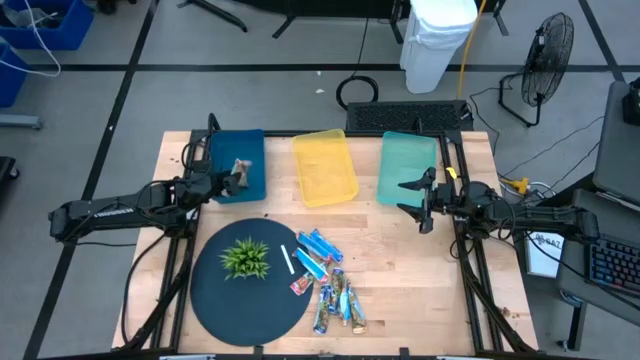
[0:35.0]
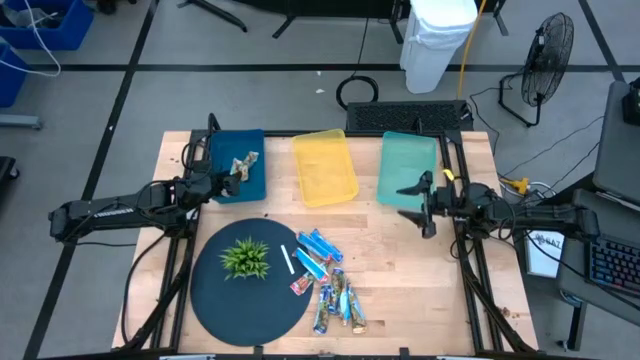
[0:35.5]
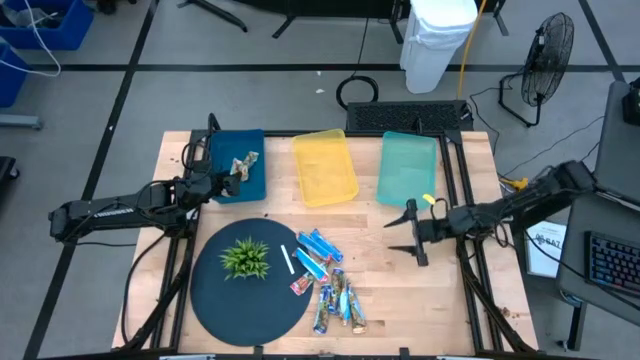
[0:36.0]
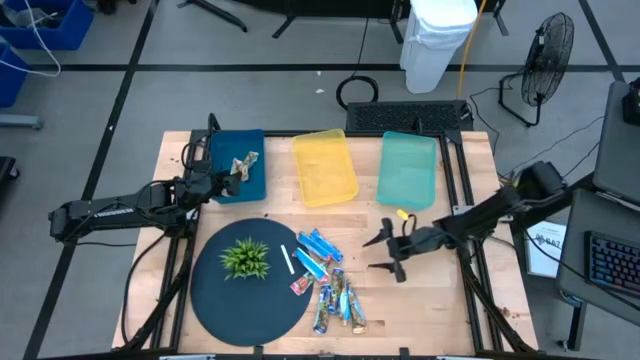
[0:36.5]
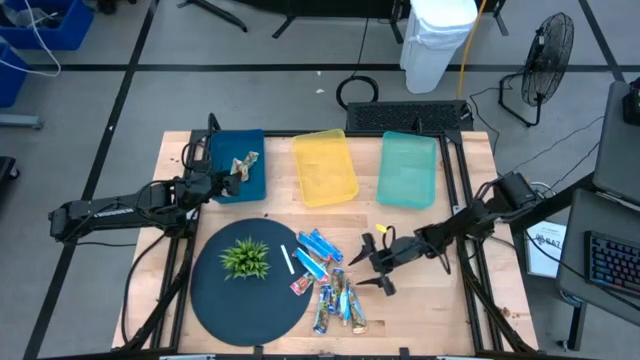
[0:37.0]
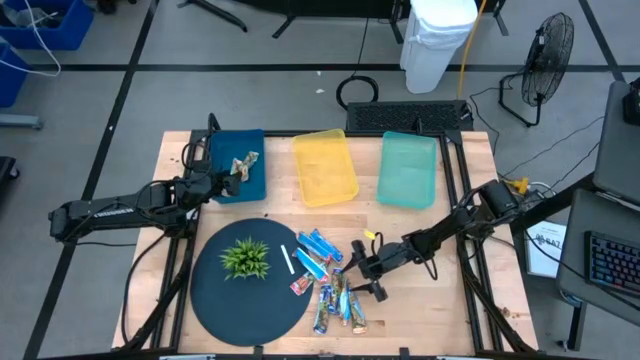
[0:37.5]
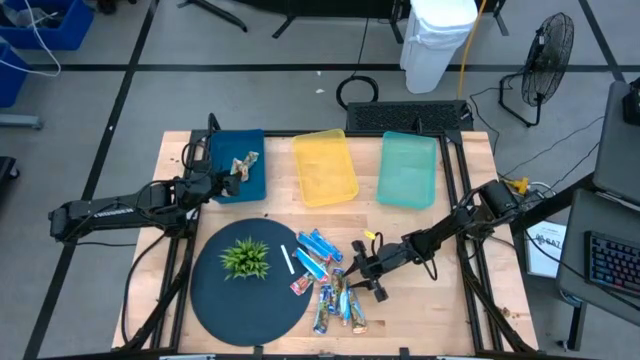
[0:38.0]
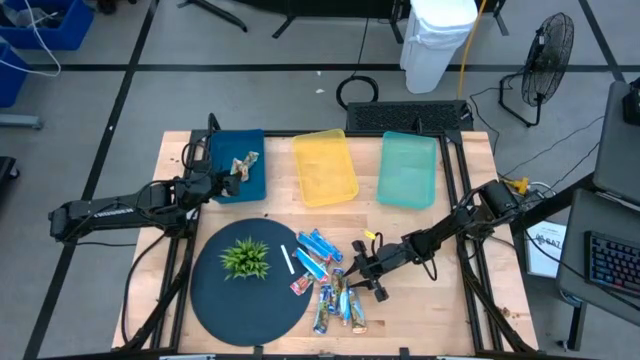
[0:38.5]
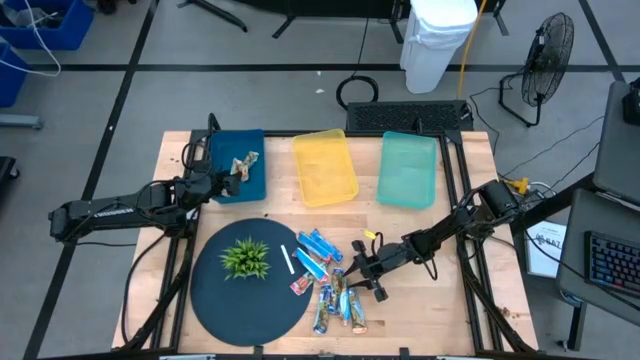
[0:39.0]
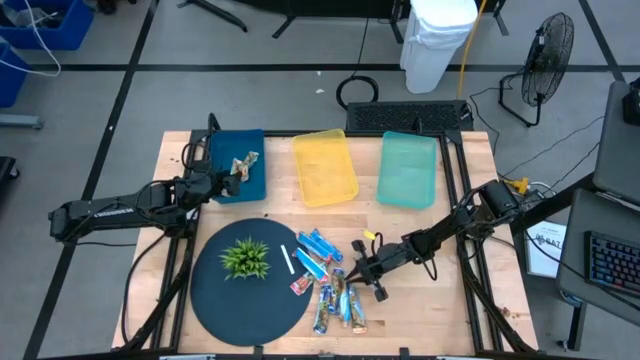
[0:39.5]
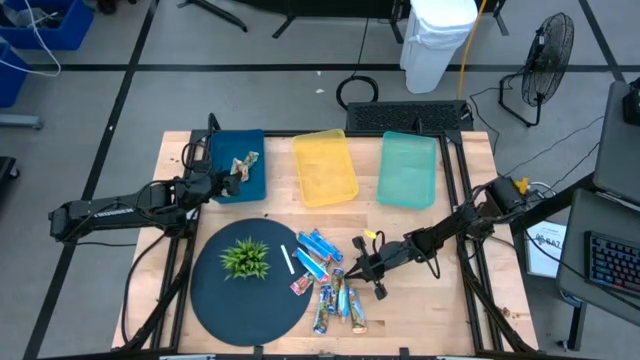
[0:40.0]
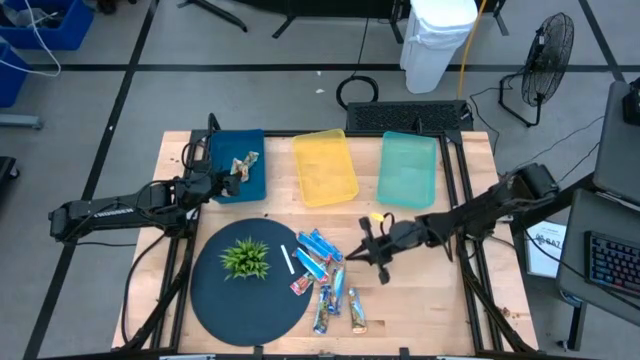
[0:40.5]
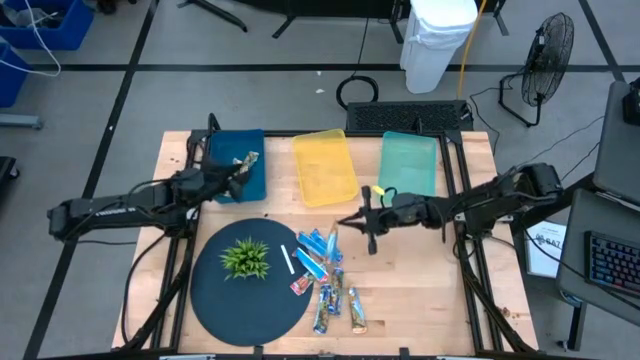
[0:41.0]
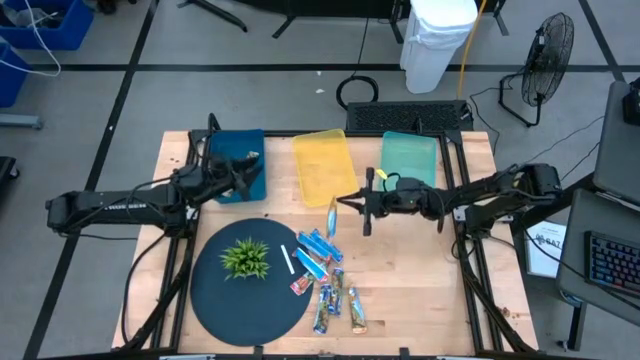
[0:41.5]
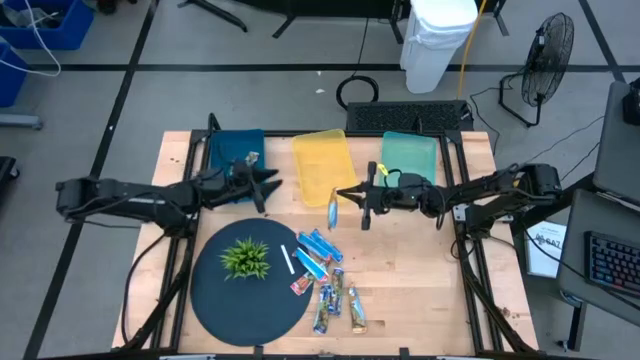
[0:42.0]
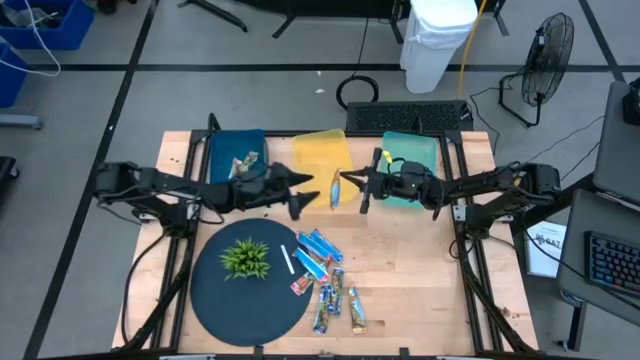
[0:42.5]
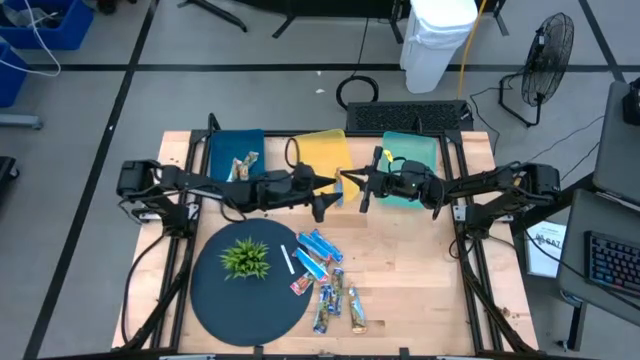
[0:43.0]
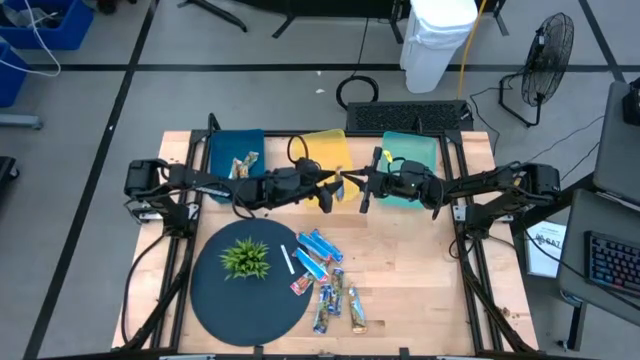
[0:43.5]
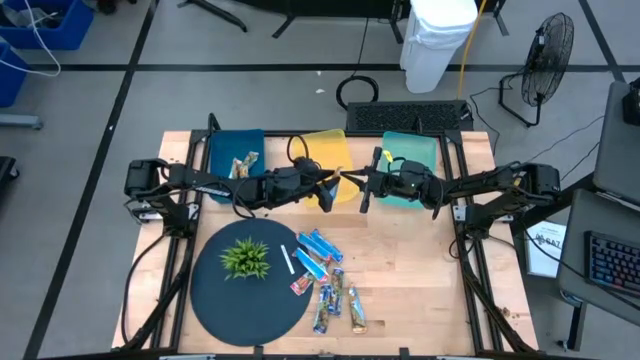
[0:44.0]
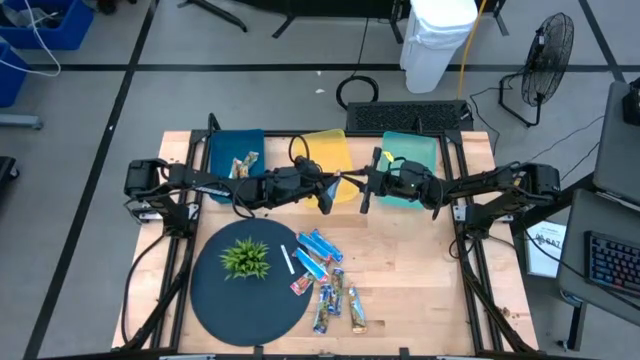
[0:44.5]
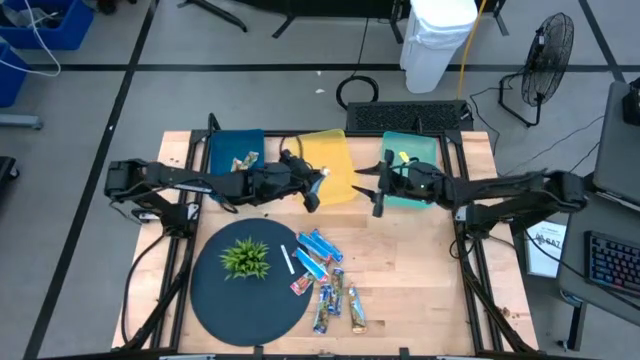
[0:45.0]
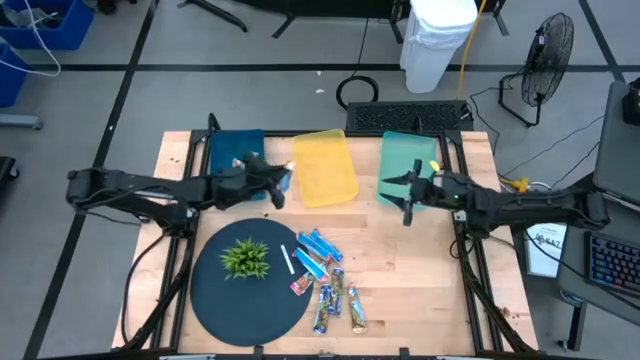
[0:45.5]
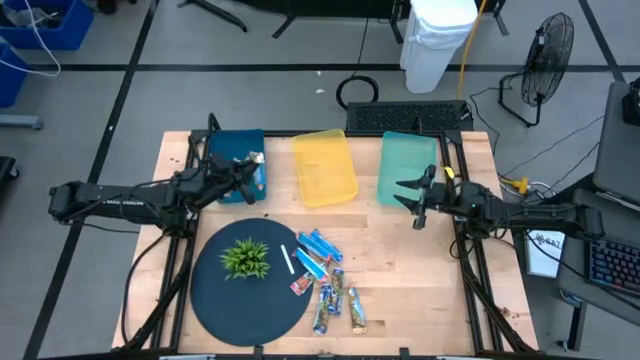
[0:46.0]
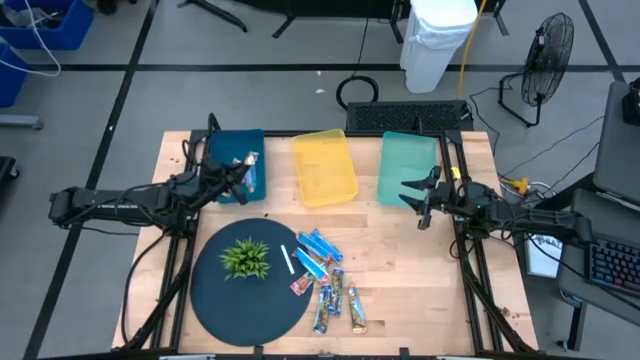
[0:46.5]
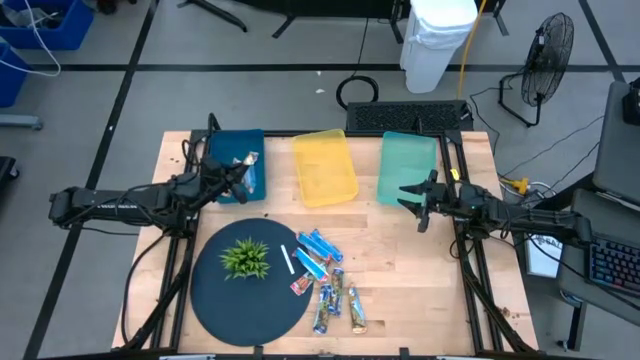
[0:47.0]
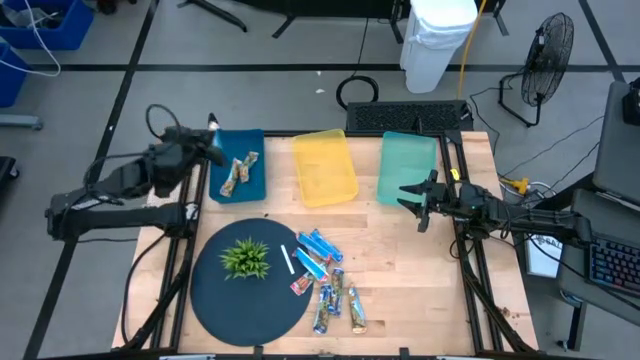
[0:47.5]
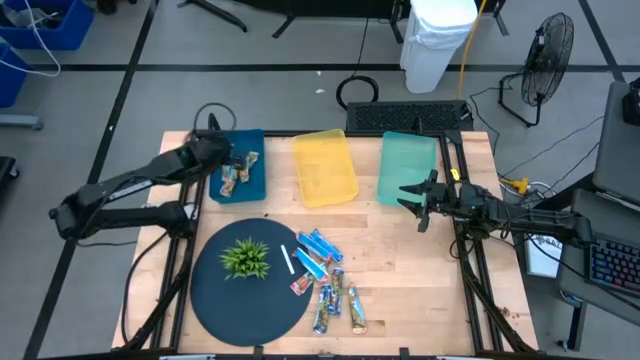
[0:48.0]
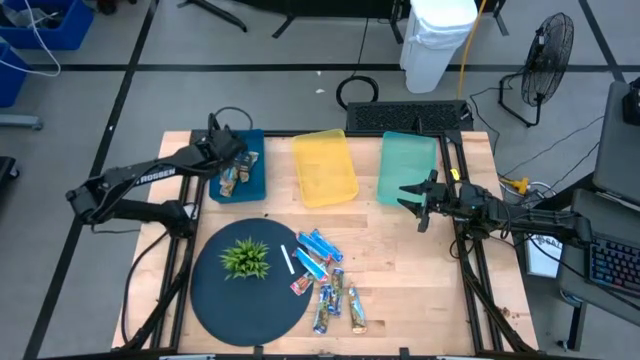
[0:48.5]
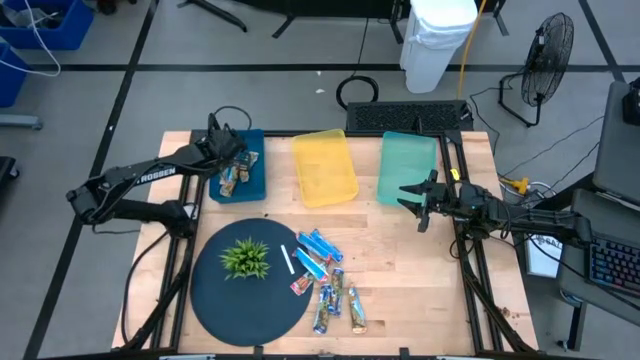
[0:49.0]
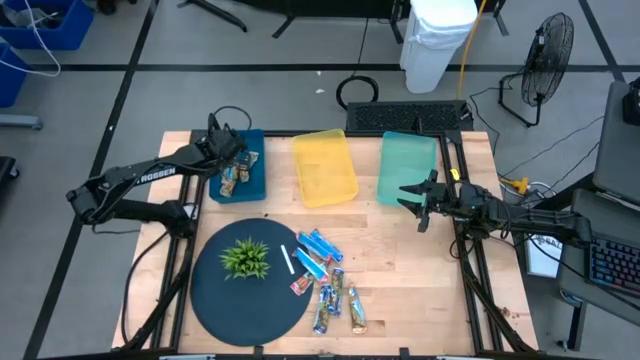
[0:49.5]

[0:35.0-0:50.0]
Task: Pick and place Granola Bars by type
Put the yellow granola bar into the blue bin

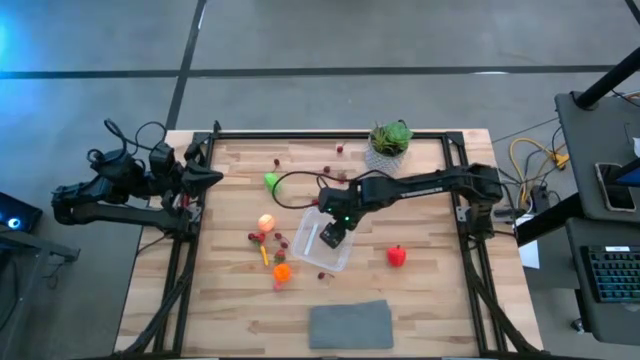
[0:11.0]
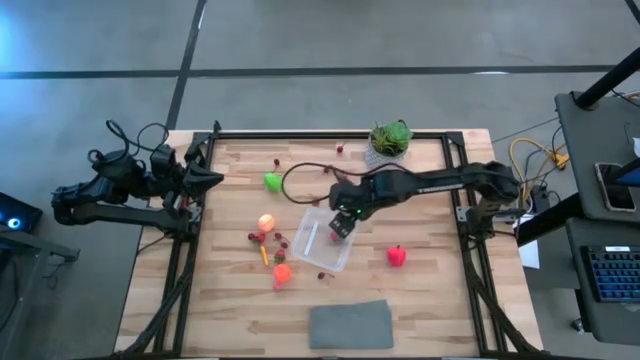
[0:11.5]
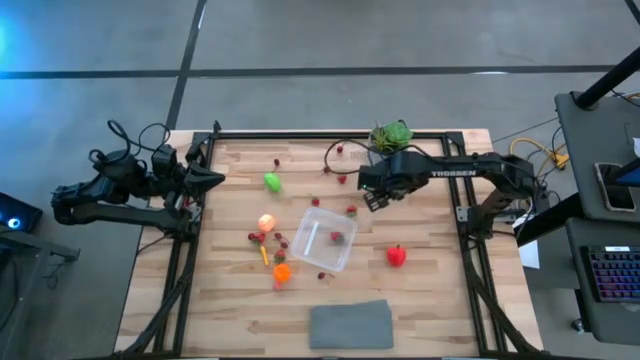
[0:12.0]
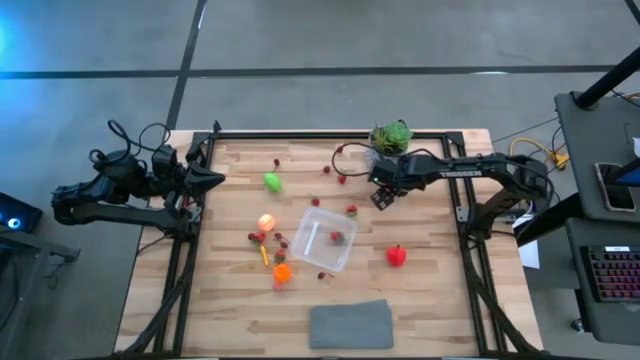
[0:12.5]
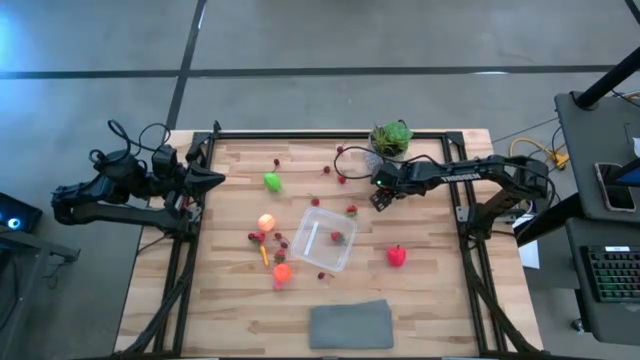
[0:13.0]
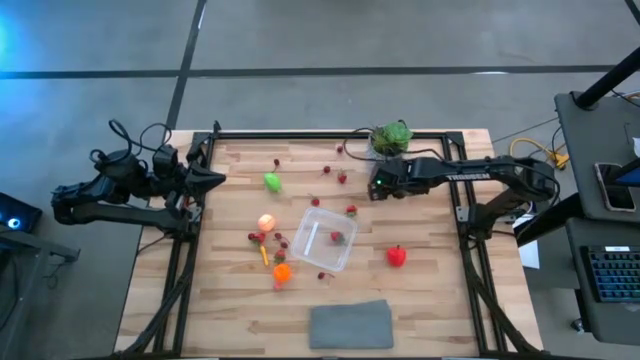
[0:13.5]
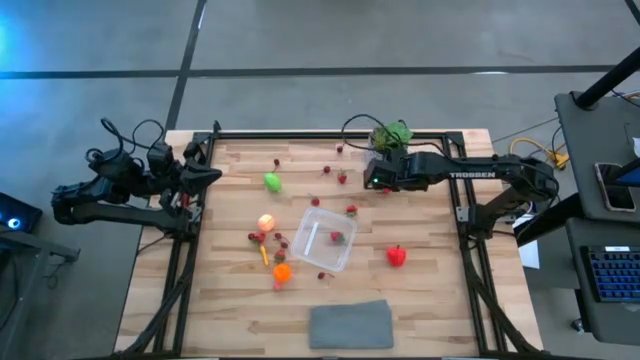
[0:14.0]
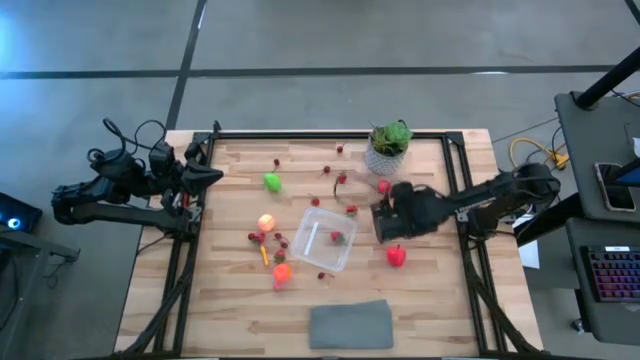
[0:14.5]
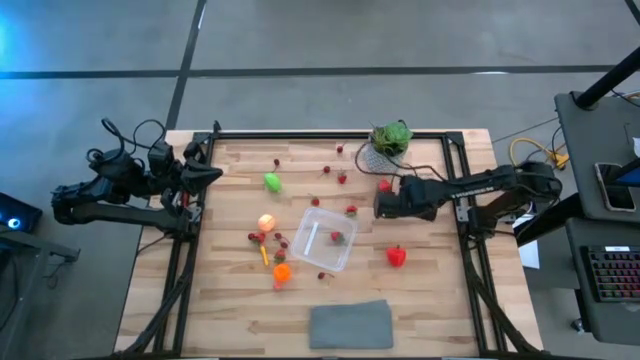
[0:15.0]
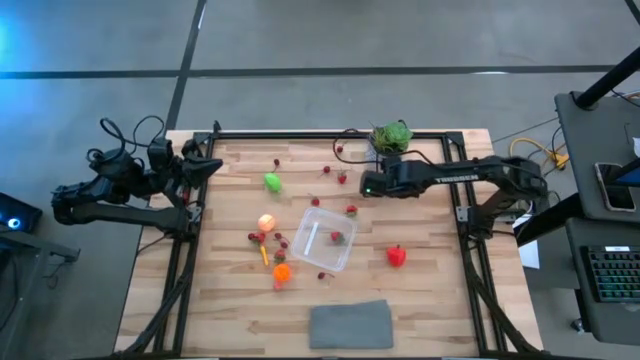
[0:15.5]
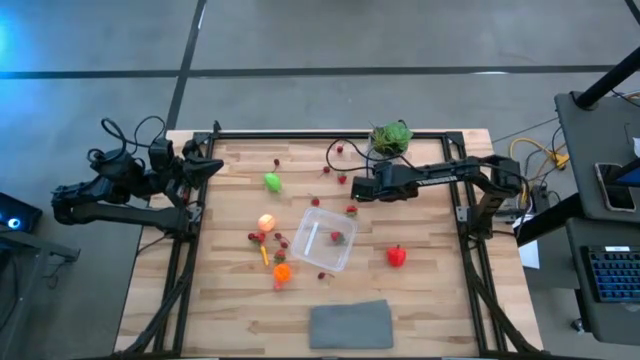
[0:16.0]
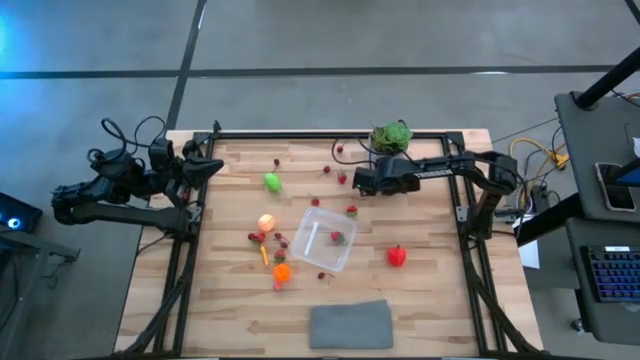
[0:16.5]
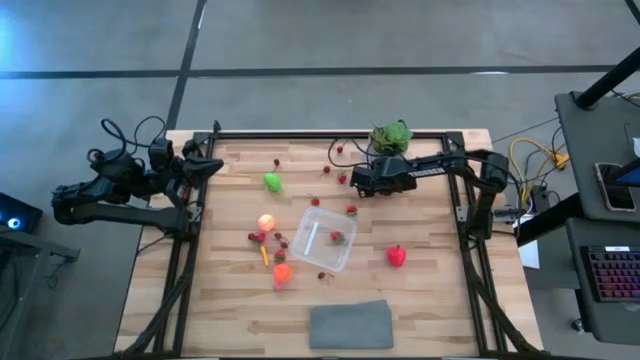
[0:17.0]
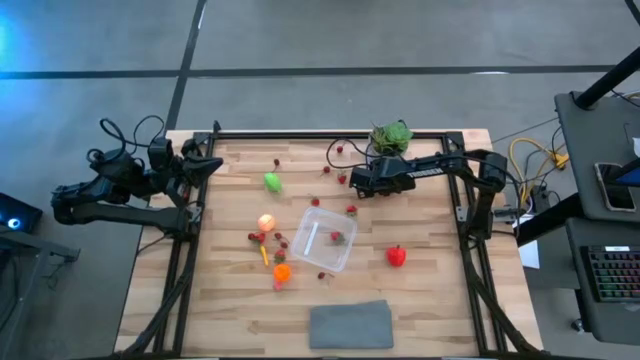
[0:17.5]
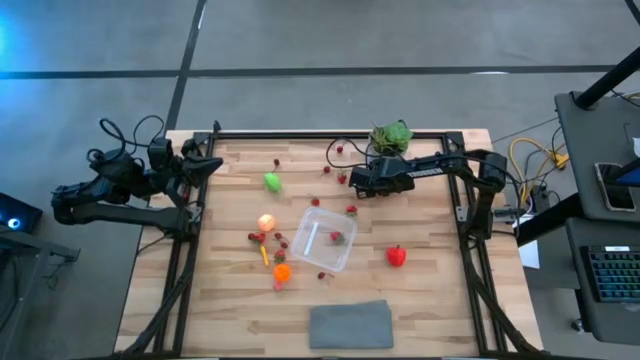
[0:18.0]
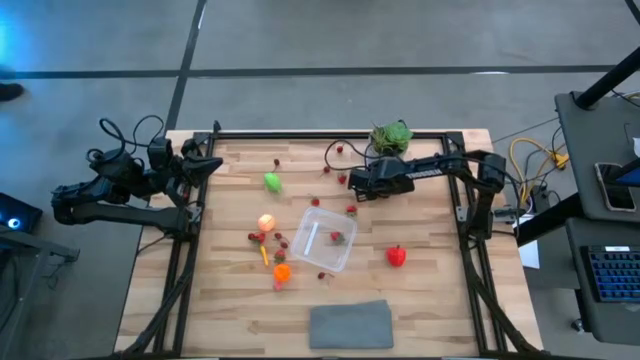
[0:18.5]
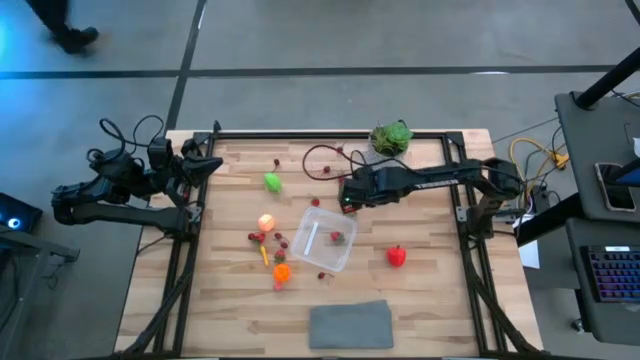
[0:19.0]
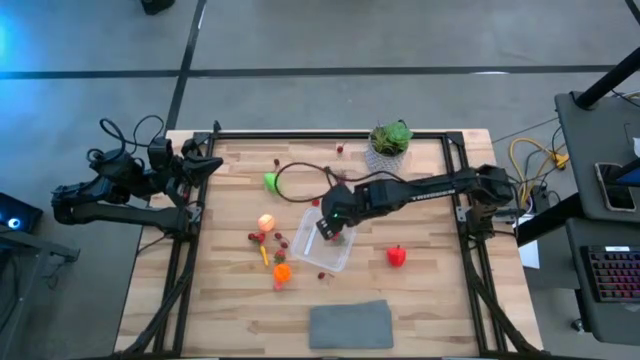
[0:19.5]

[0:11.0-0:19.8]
Task: Pick and placing Produce into tupperware
Put the red strawberry into the transparent container
